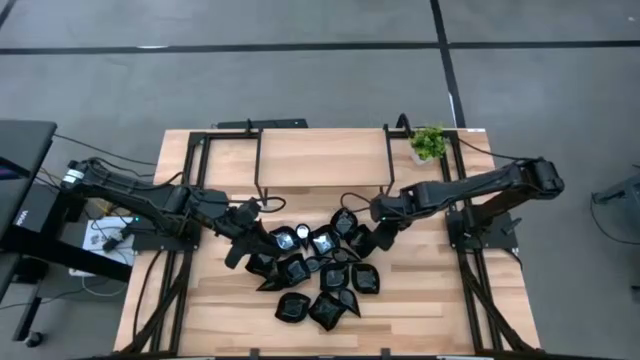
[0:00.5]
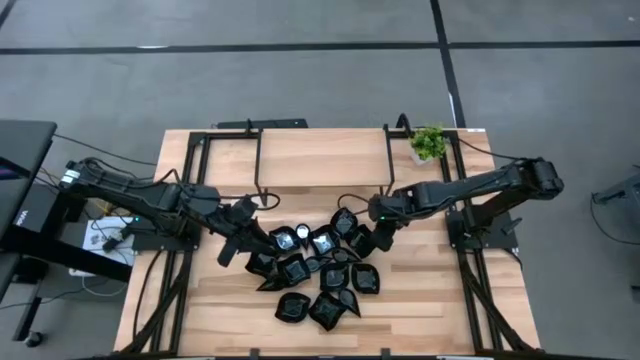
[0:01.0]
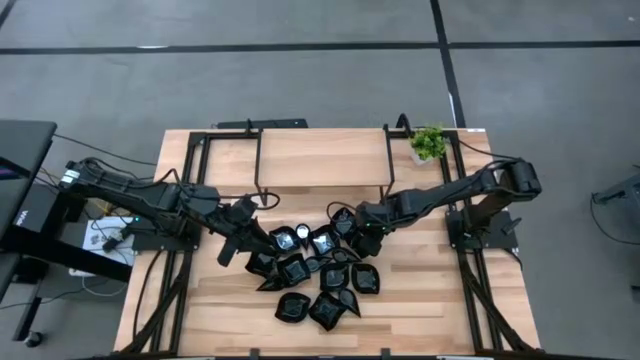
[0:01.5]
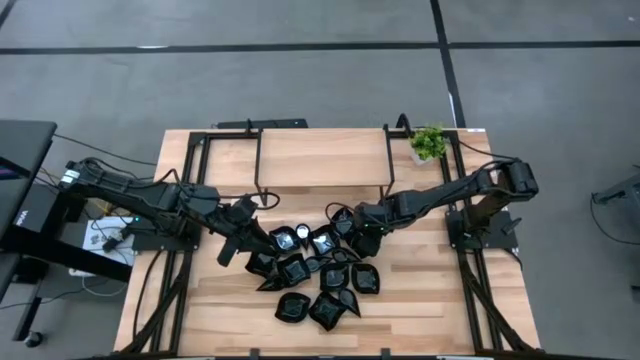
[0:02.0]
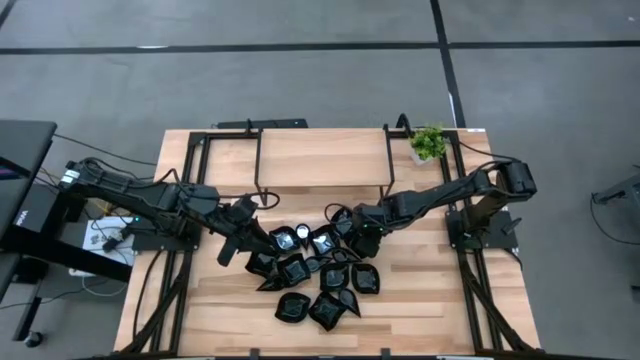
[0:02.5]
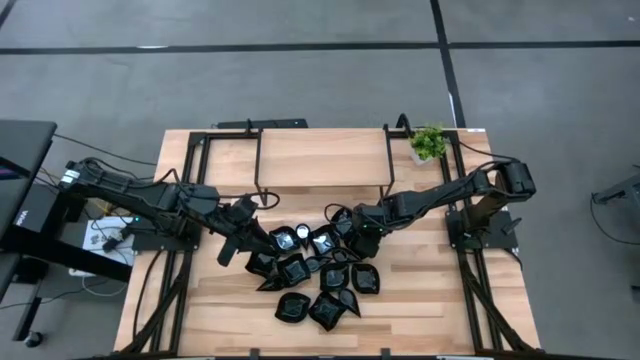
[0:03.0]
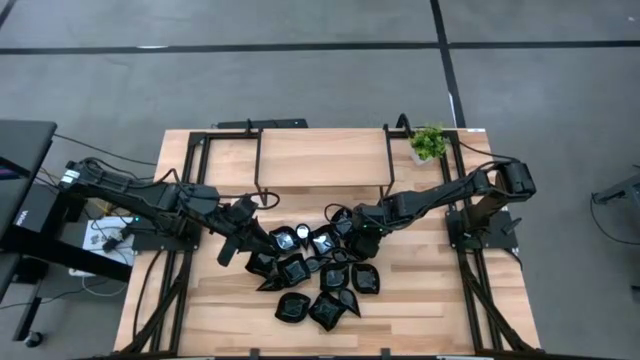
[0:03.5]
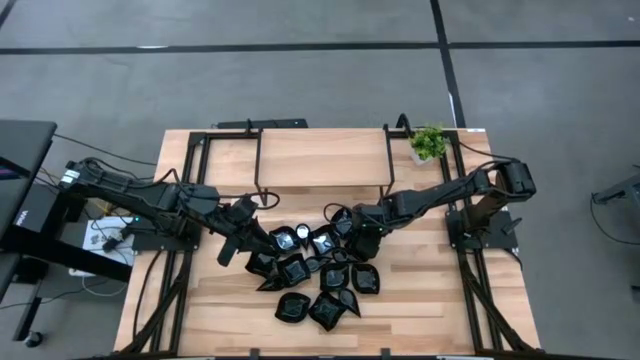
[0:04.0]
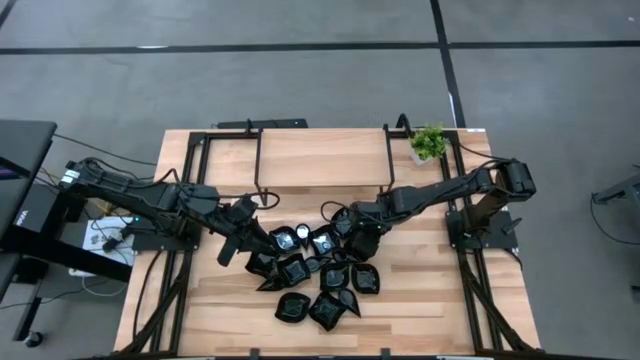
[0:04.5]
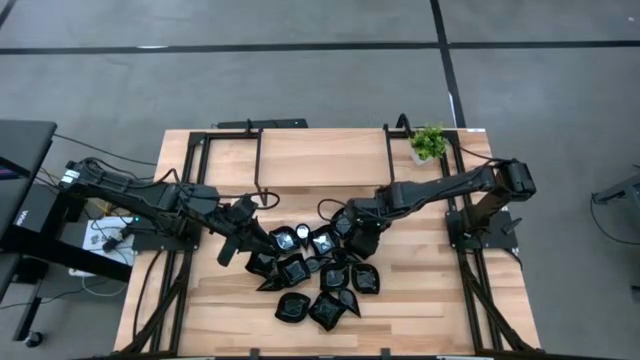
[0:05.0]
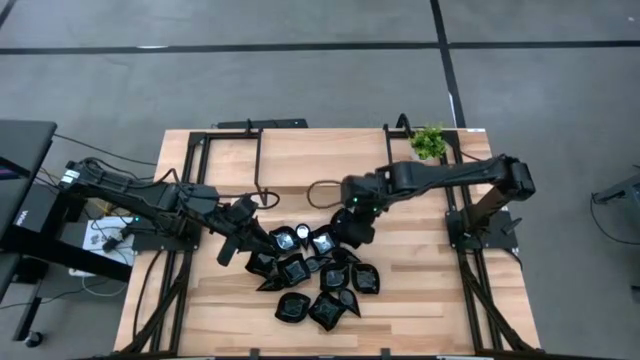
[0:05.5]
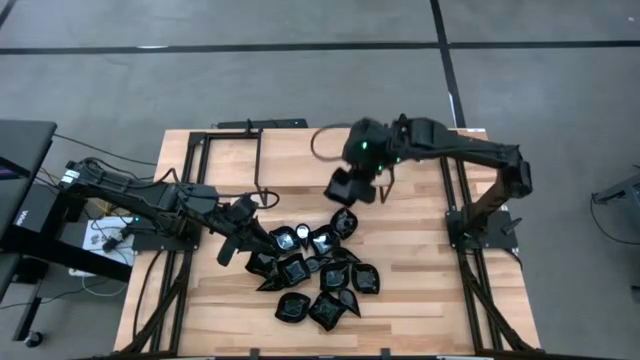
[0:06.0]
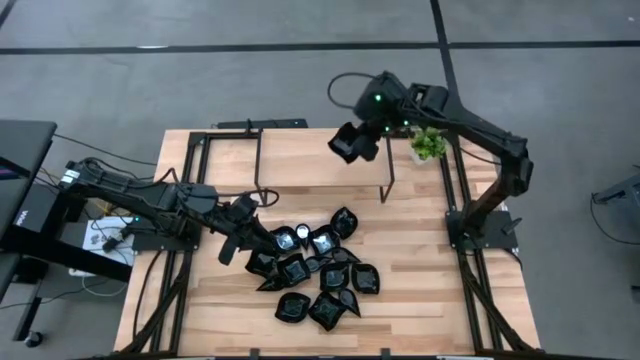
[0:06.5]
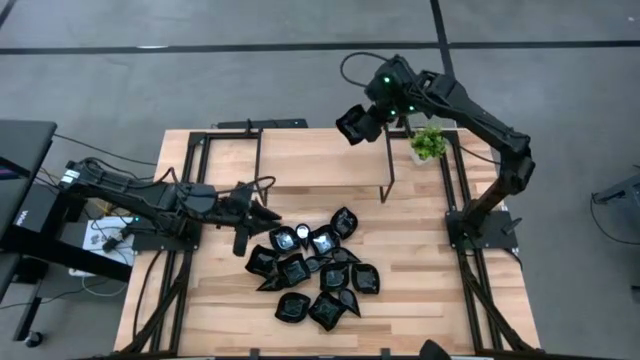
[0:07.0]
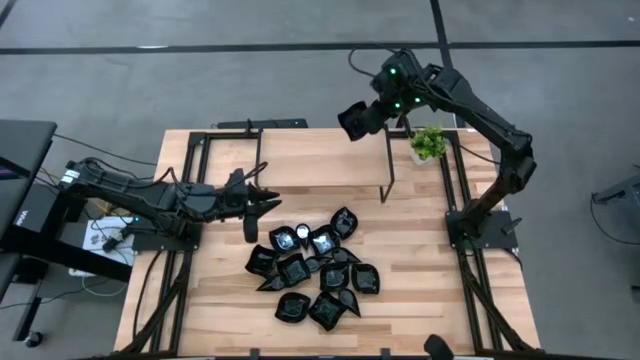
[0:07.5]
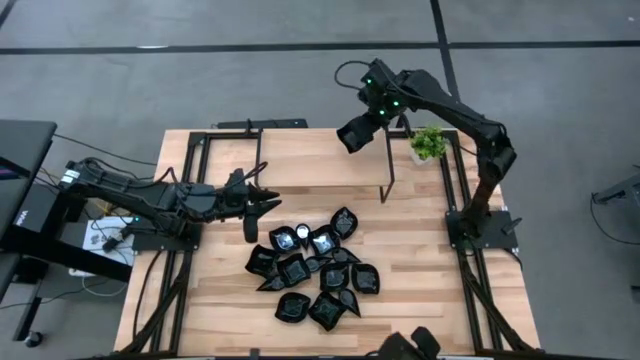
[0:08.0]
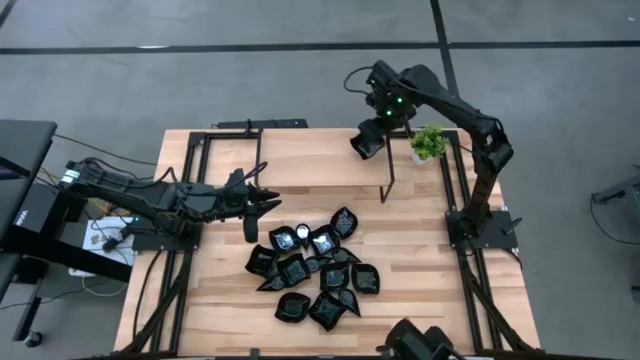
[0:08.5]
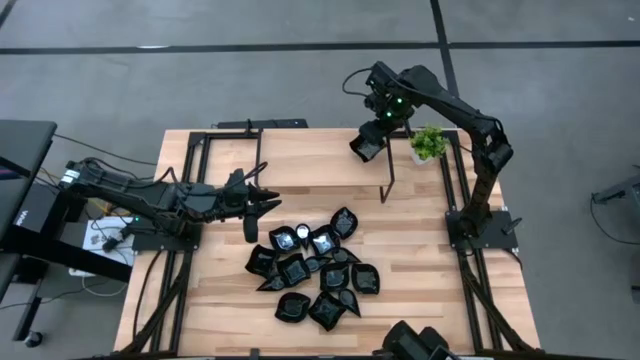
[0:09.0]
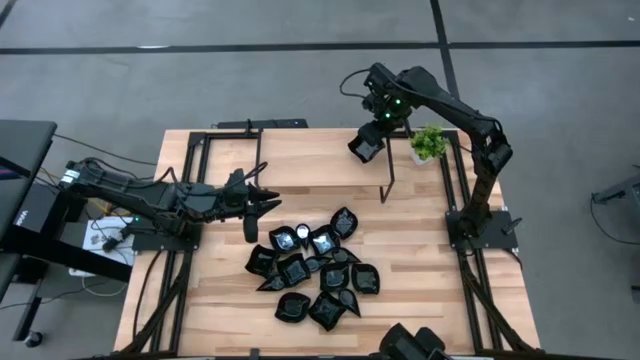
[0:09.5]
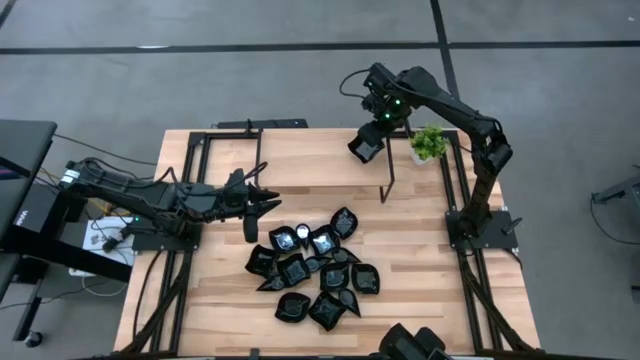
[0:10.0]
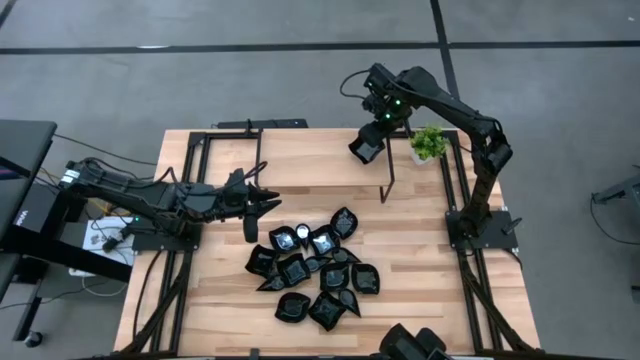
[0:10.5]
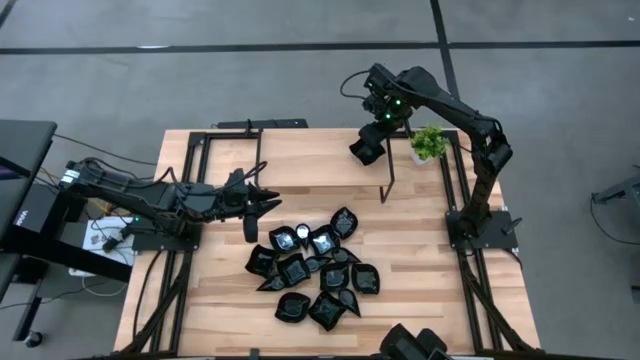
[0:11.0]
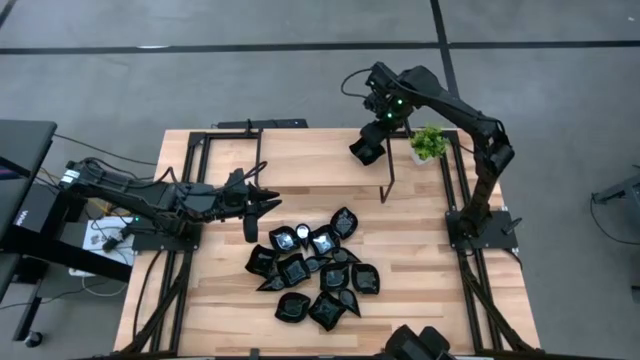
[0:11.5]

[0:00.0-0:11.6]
Task: Pick & Place Mini shaped plates
Put the black distorted square plate on the shelf
